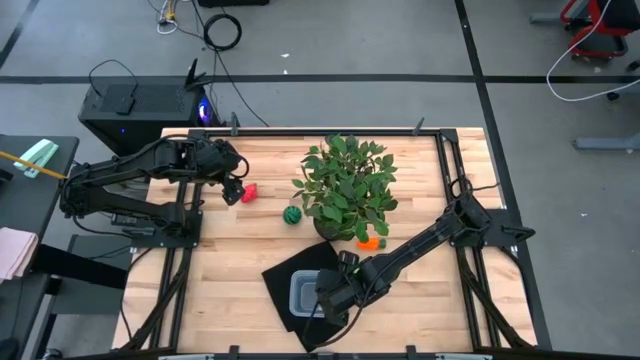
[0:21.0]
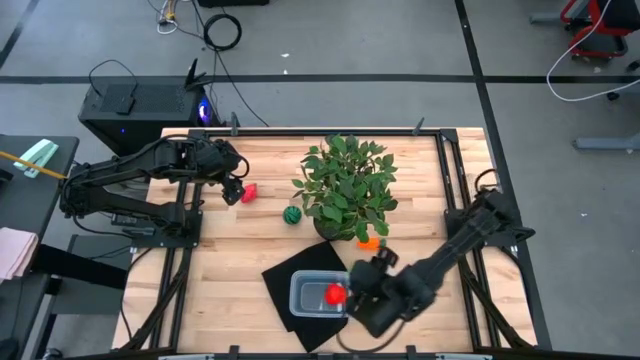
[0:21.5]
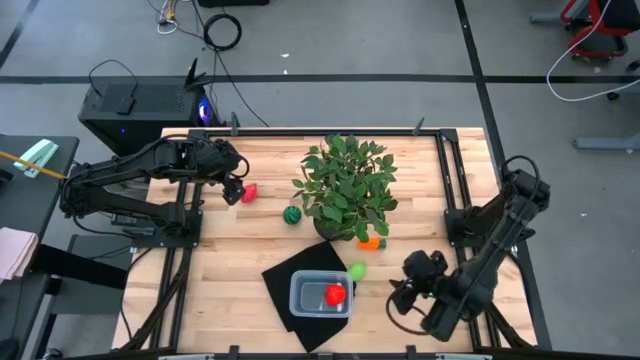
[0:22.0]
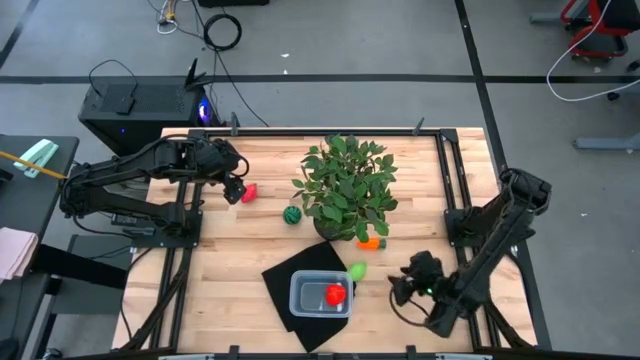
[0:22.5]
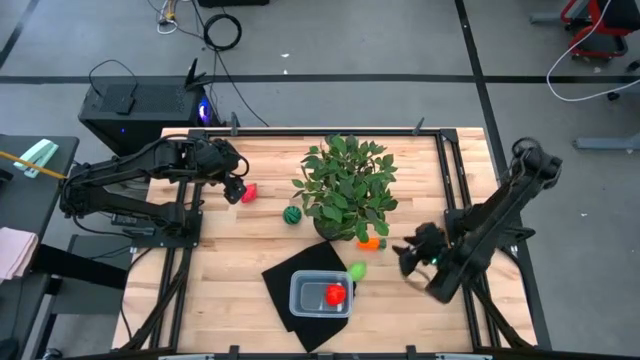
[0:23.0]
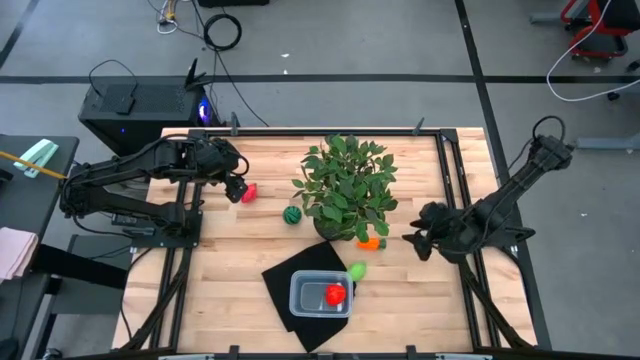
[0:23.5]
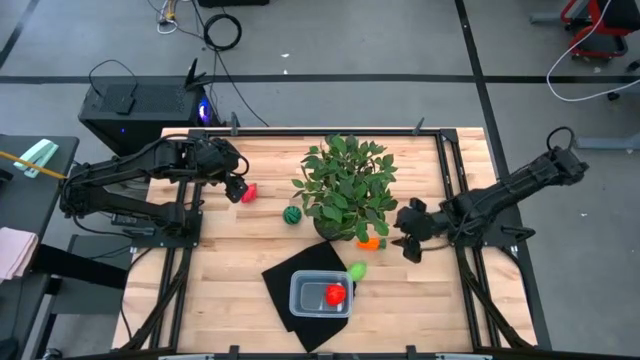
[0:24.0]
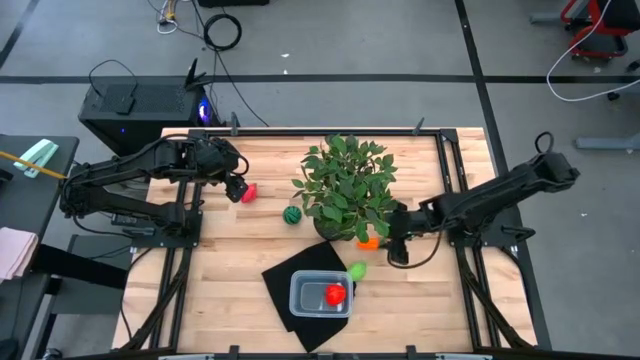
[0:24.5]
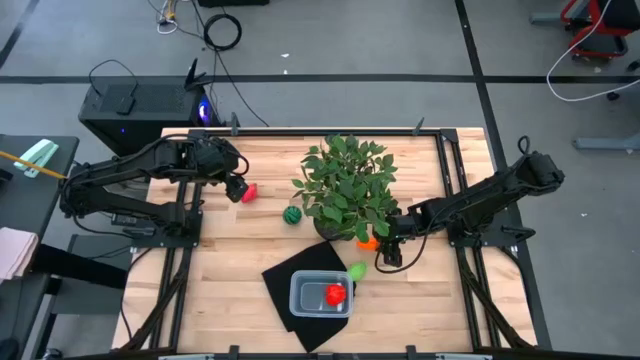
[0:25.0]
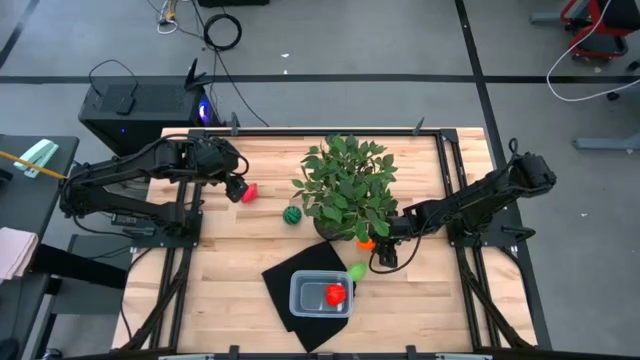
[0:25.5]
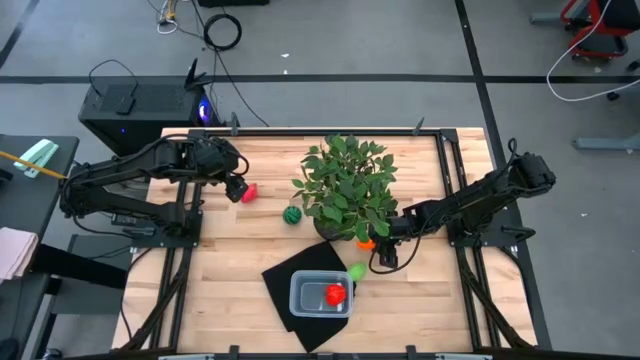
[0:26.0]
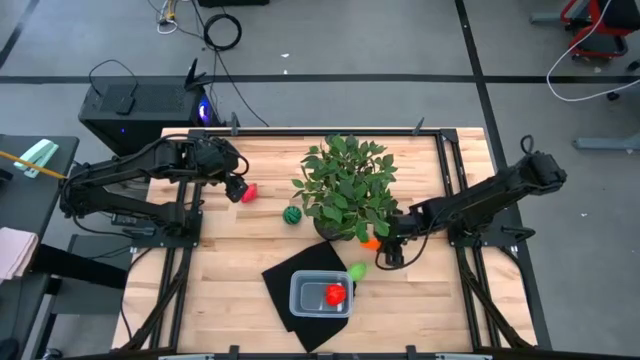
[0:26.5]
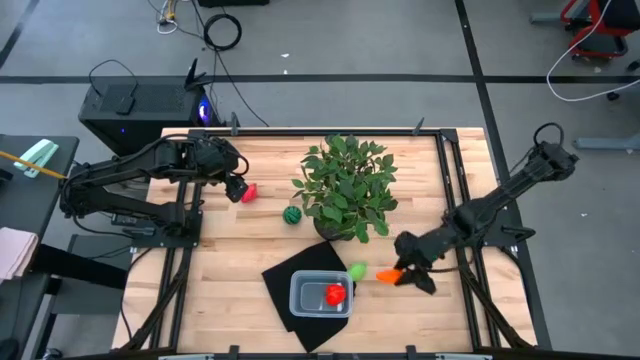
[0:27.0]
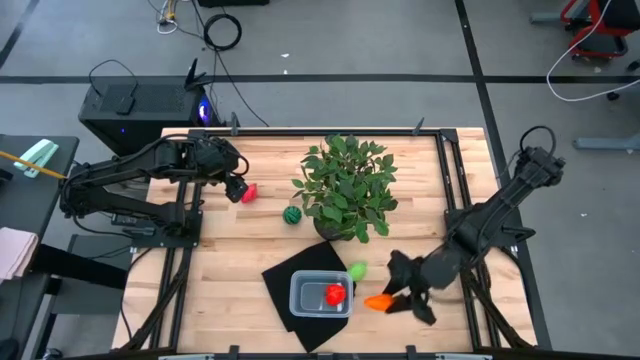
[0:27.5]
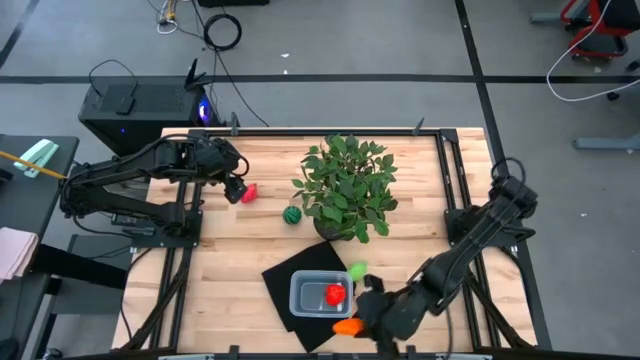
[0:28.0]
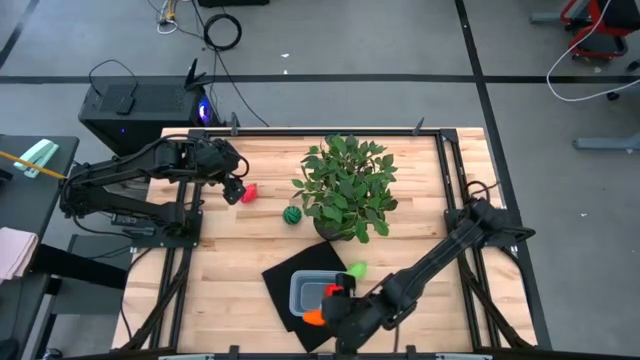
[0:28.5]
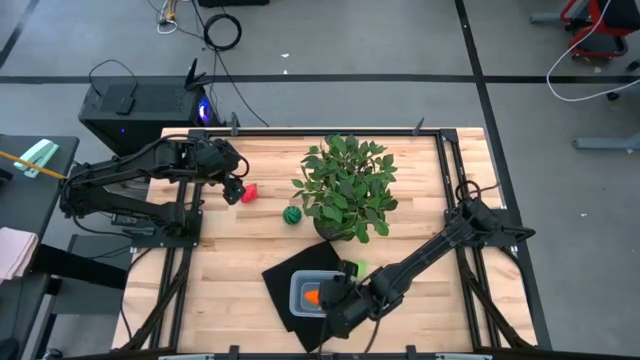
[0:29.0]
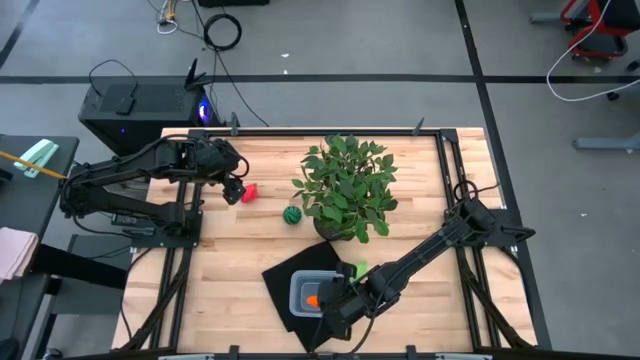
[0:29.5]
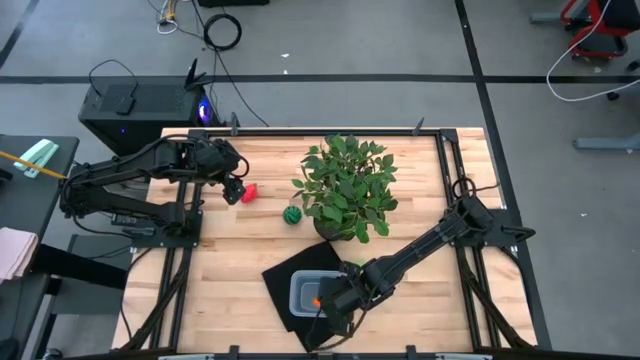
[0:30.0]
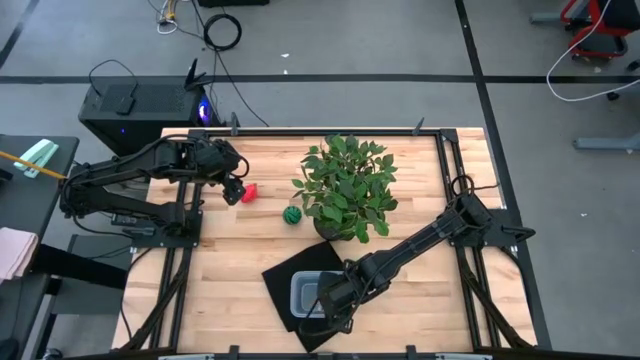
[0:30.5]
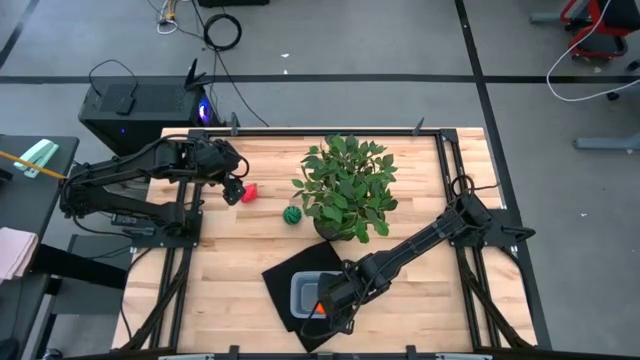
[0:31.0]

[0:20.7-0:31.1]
Task: Pick and placing Produce into tupperware
Put the orange carrot into the transparent bin

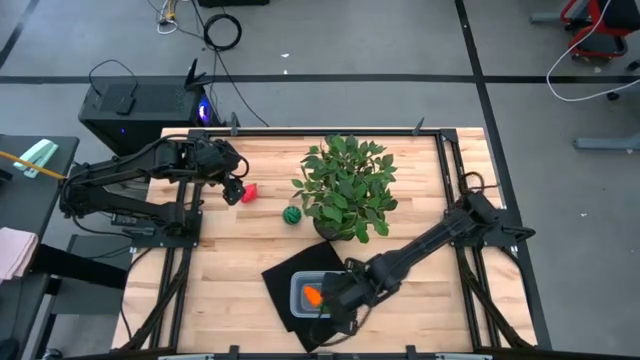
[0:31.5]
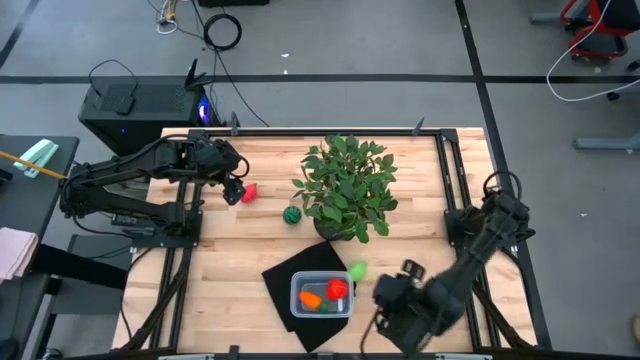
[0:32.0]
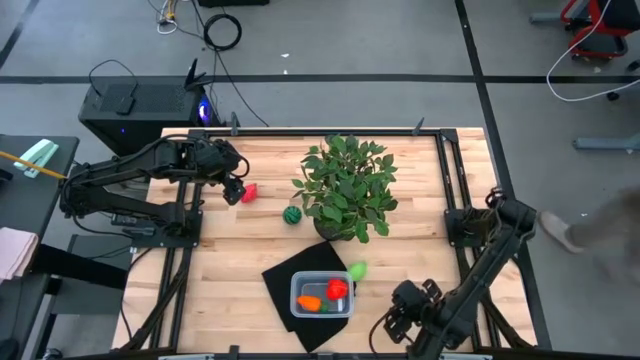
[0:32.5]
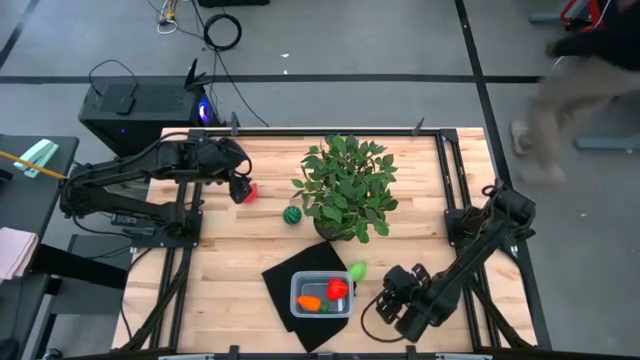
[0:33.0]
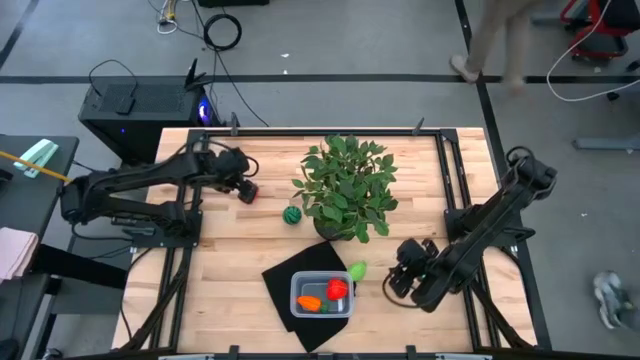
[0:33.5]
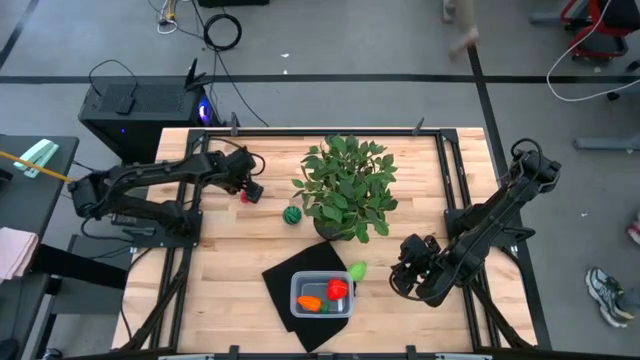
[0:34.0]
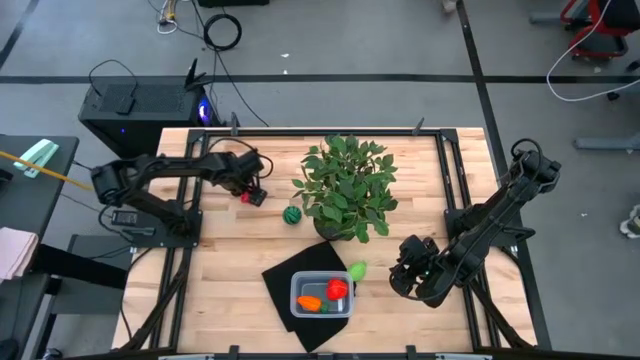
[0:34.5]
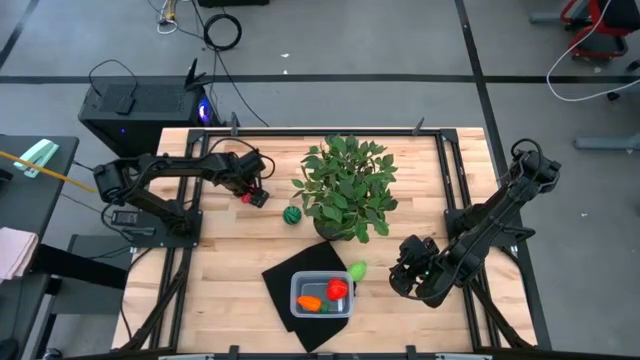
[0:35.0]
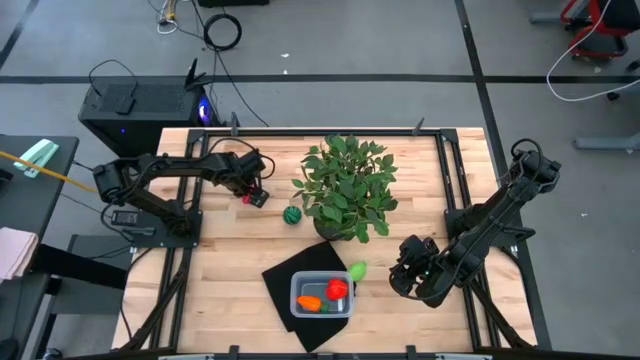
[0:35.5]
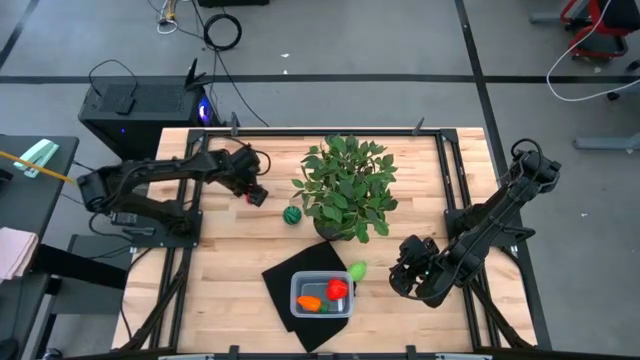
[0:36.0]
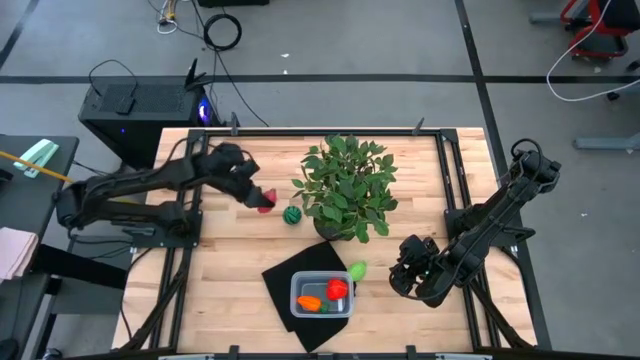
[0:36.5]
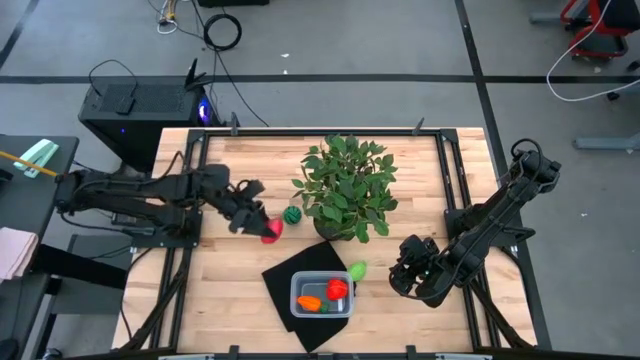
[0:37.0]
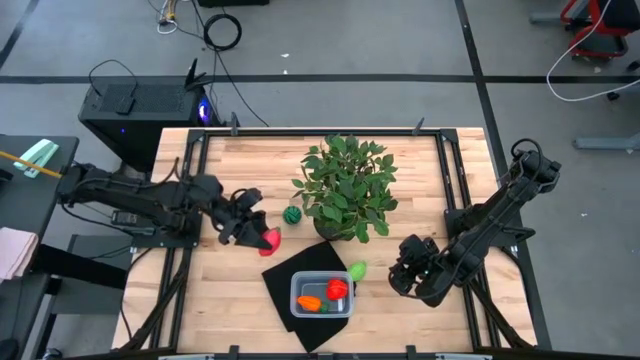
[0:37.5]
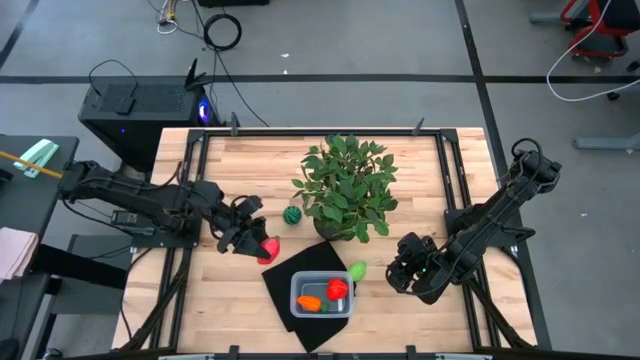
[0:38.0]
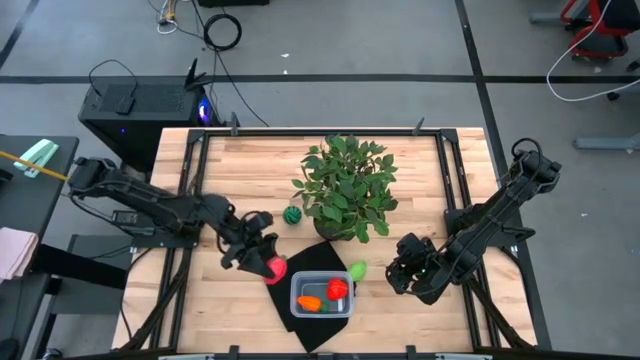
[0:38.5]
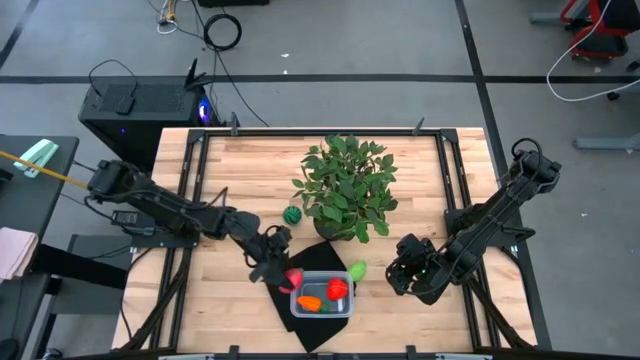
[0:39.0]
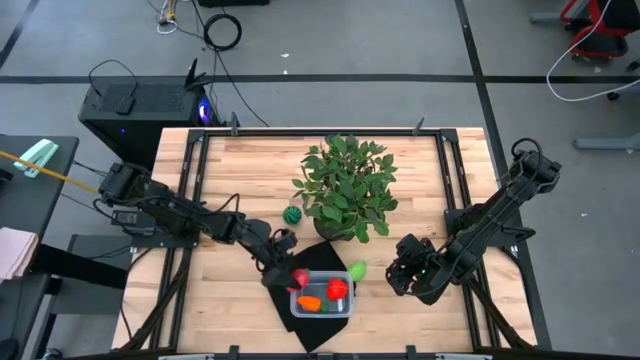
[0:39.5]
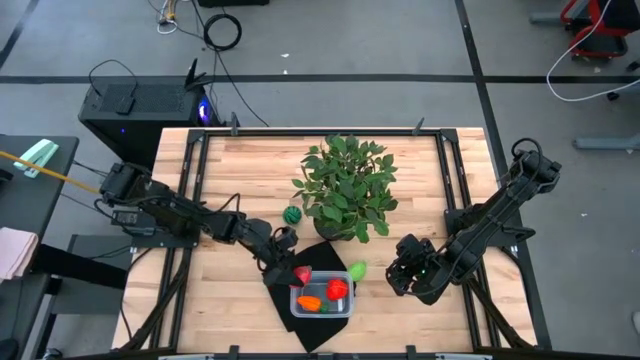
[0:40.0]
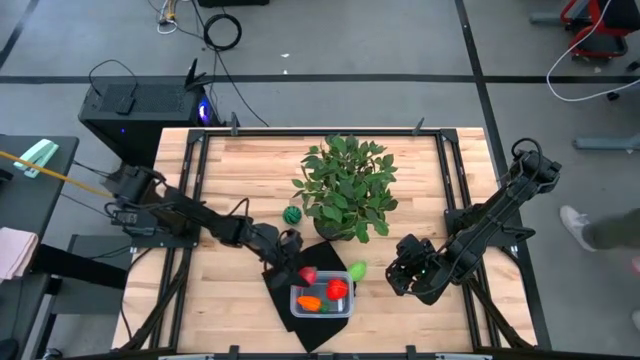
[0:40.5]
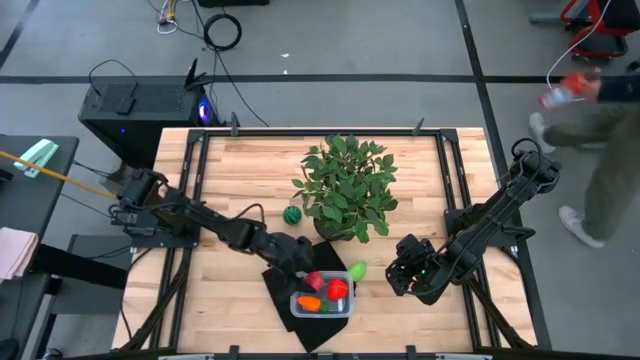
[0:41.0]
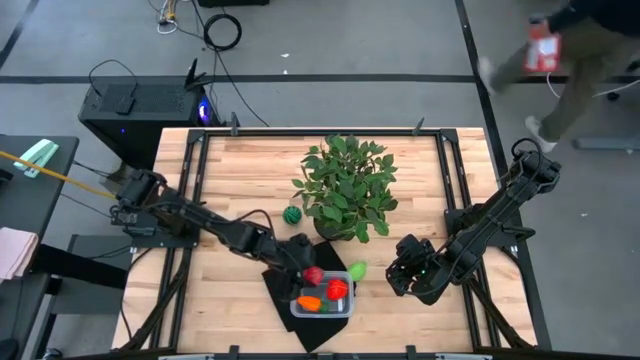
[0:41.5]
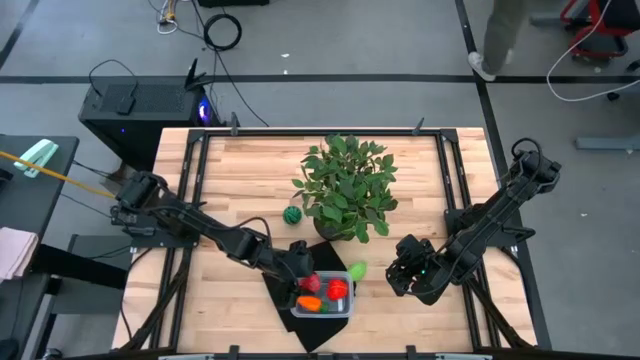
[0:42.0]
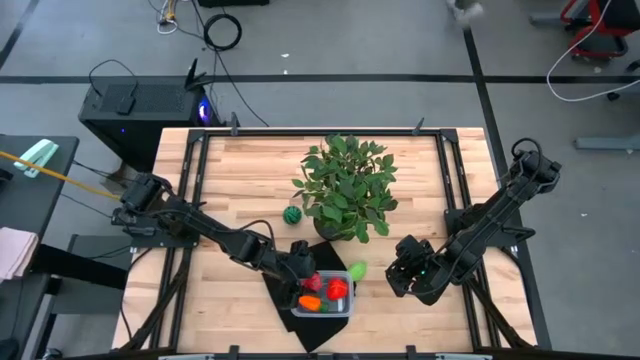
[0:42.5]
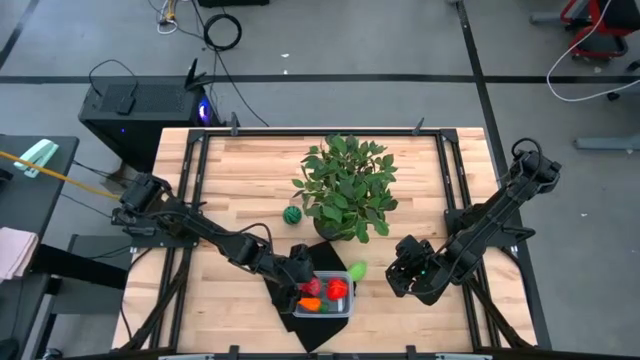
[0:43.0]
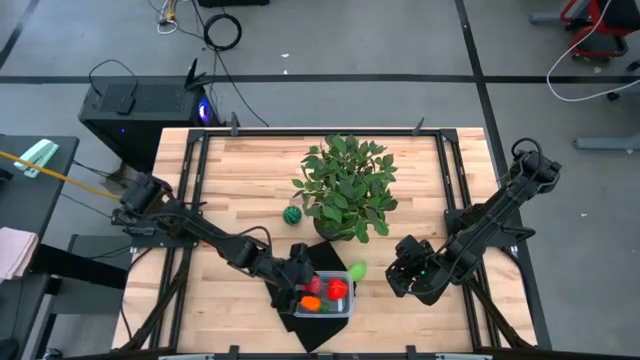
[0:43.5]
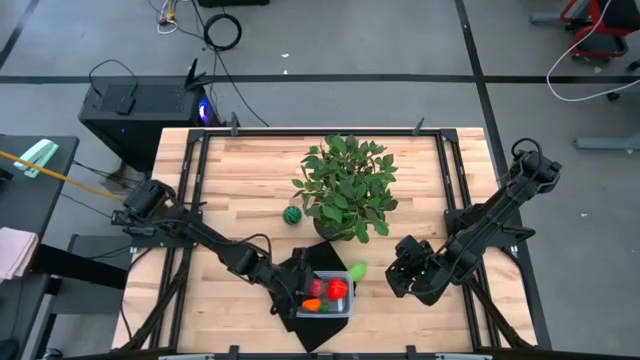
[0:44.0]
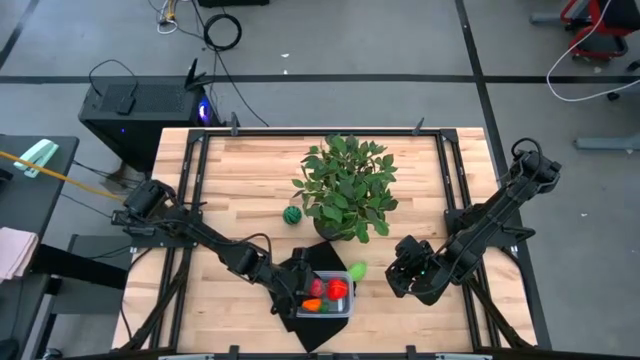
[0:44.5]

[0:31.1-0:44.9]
Put the red dragon fruit into the transparent bin
